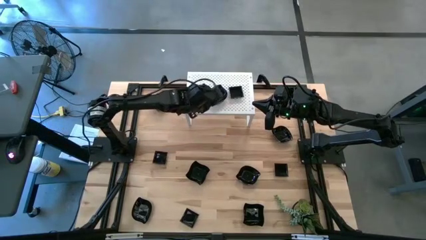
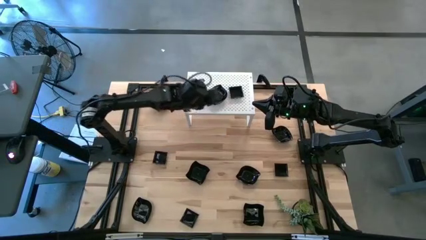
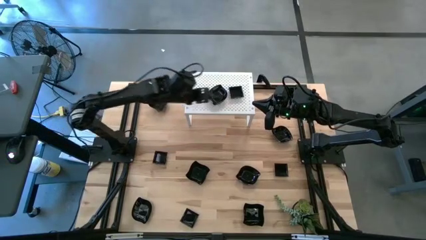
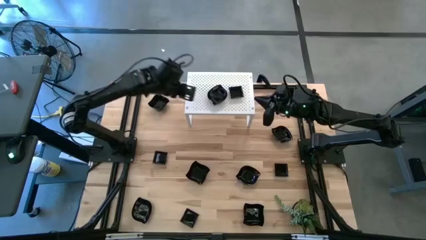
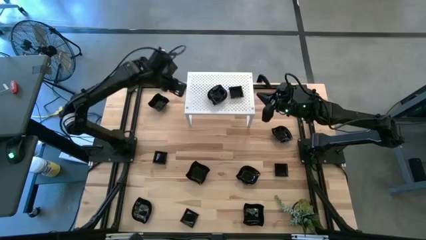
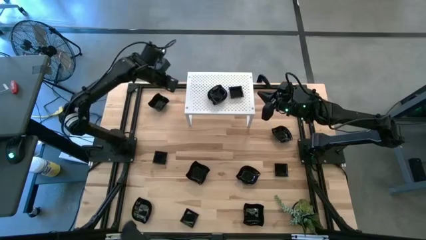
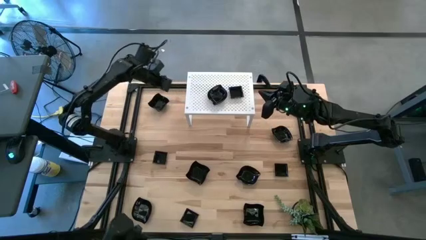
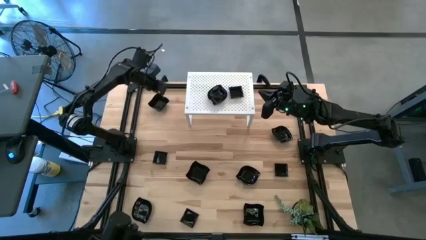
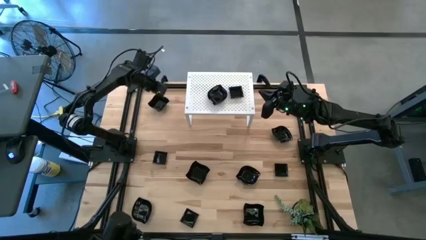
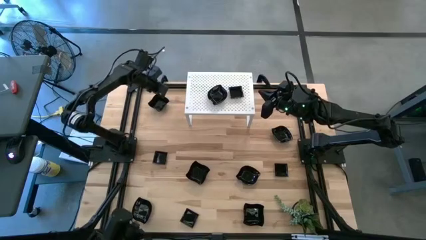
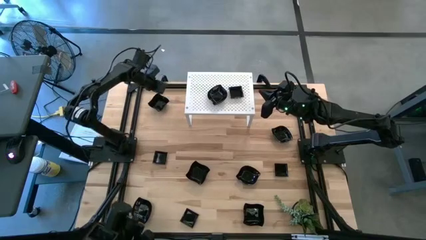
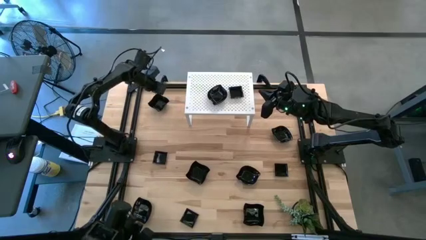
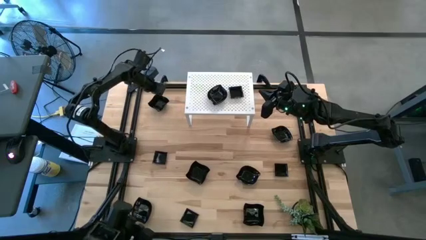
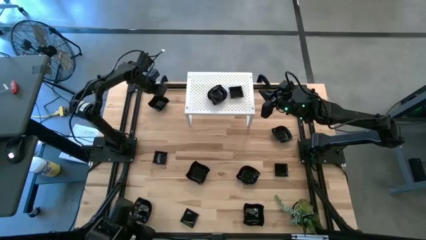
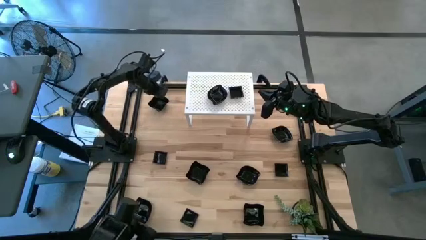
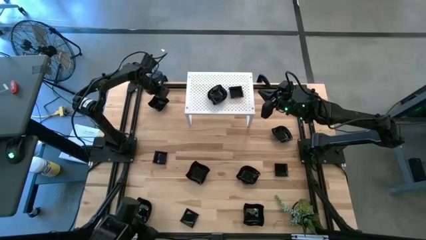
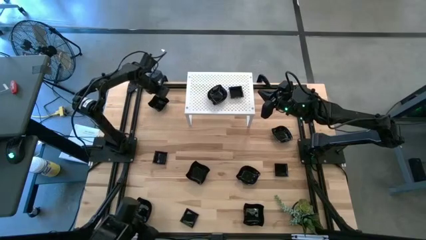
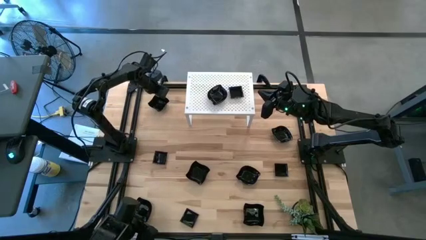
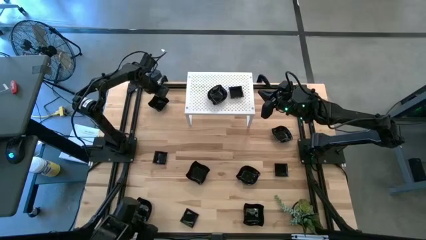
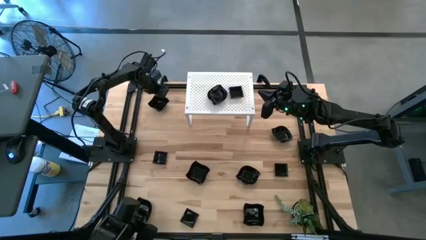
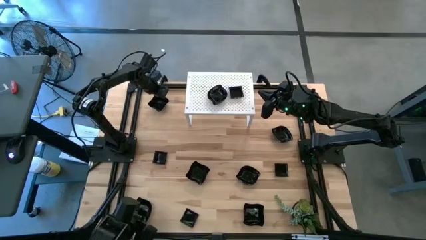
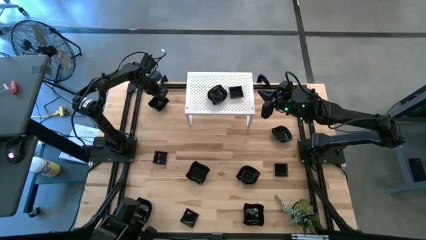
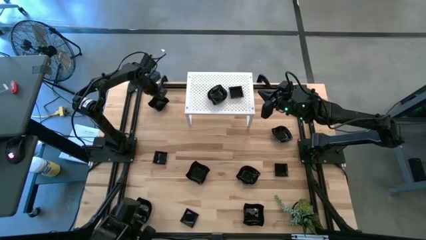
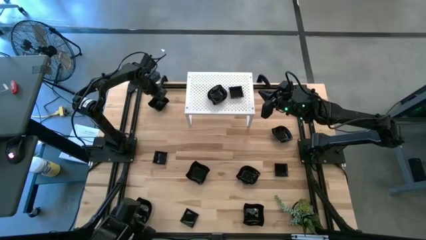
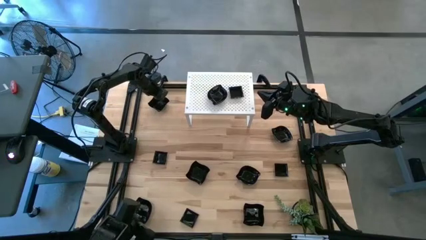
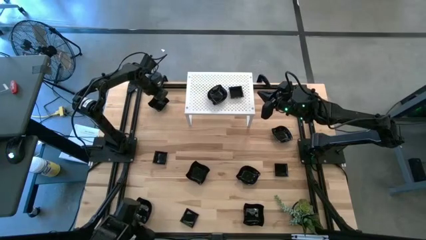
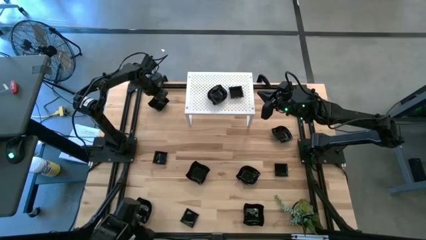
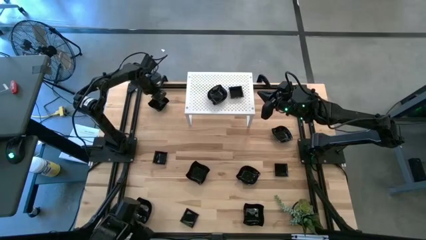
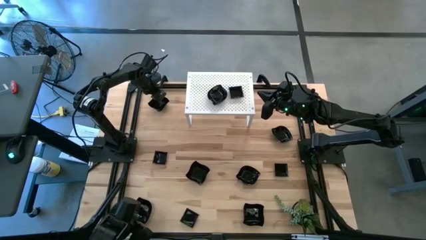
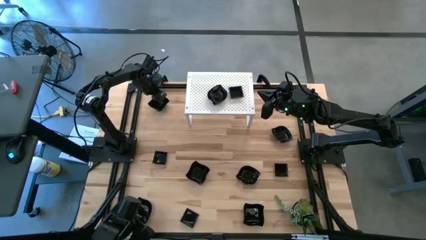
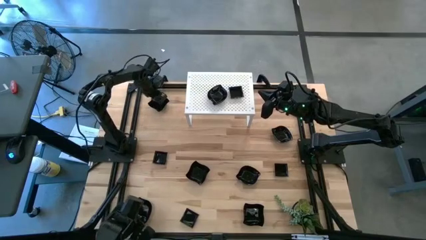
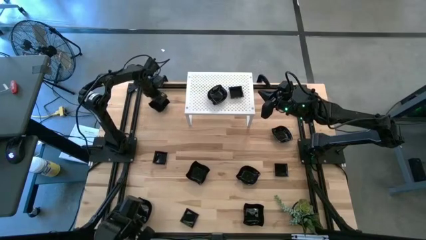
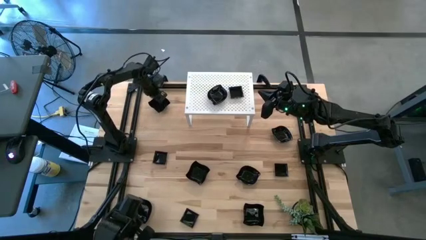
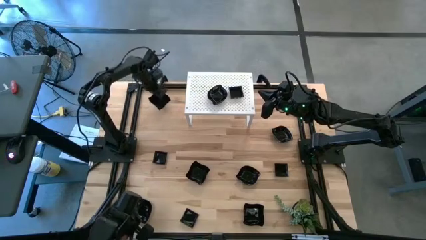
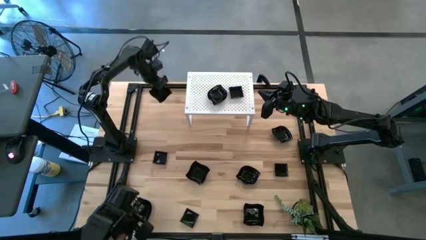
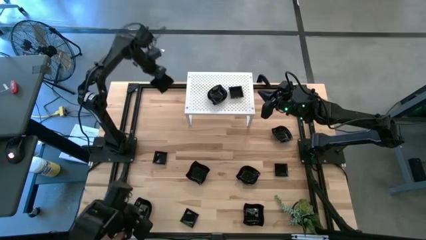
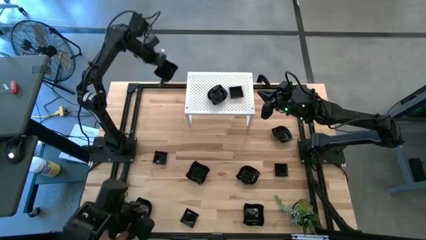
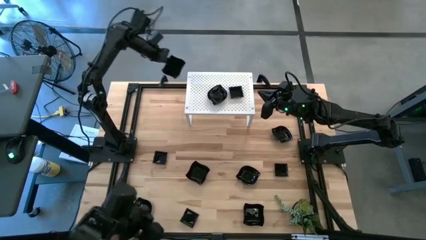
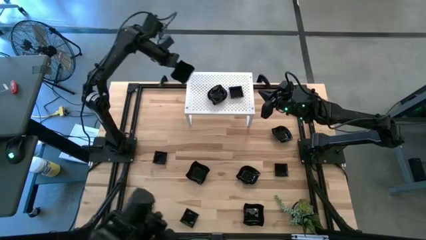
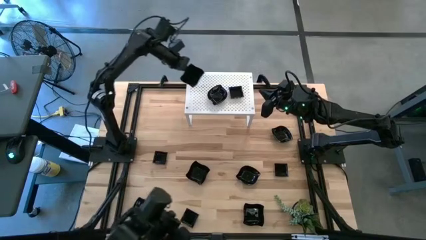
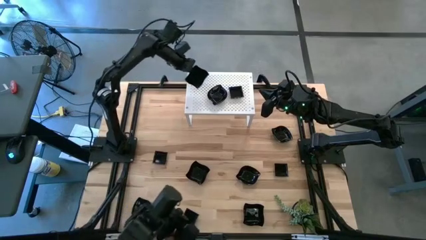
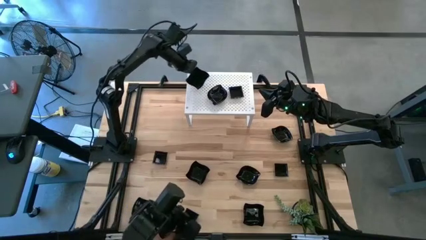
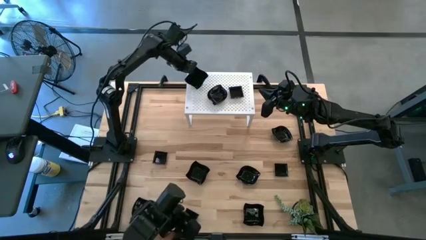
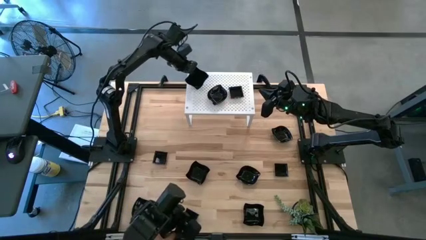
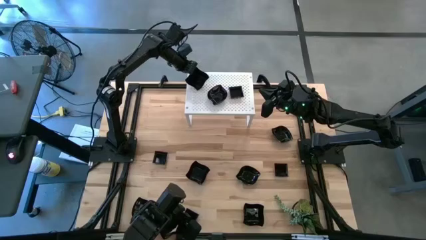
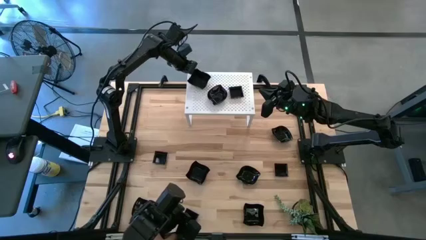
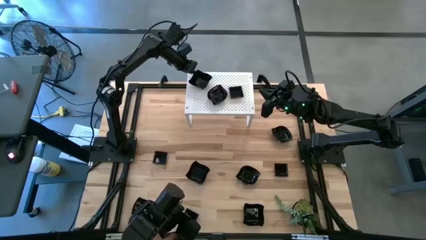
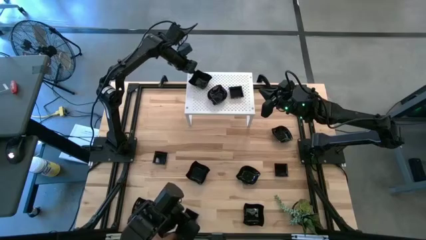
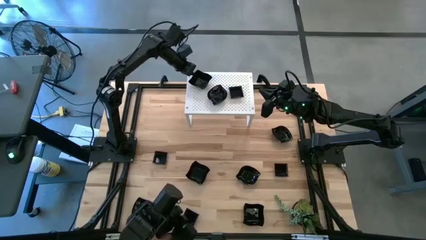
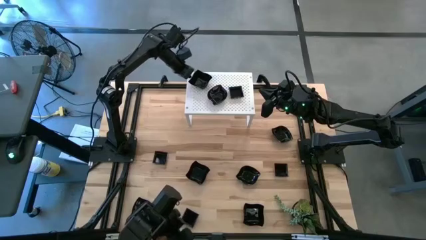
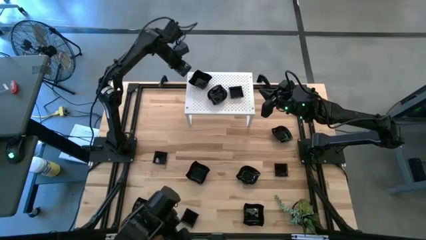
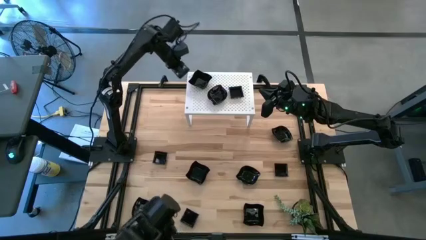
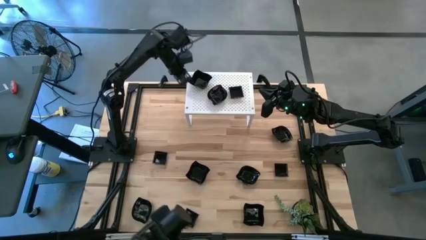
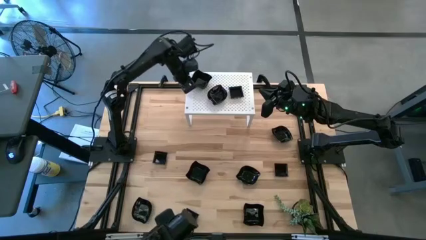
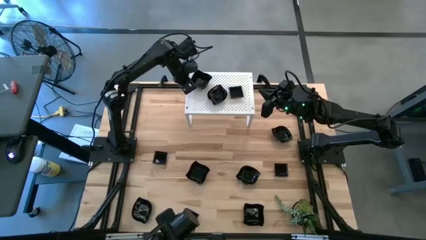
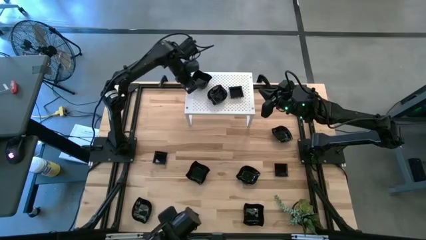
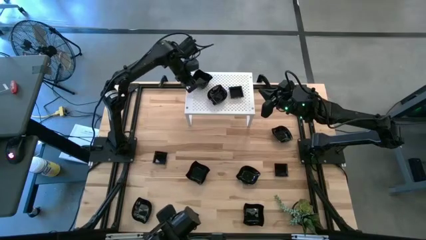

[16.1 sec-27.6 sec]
Task: Pick & Place Mini shaped plates
Put the distorted black square plate on the shelf
